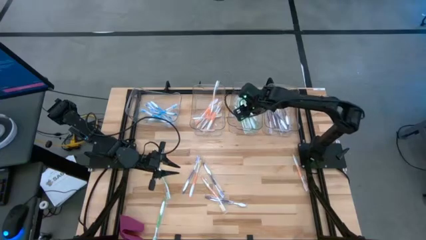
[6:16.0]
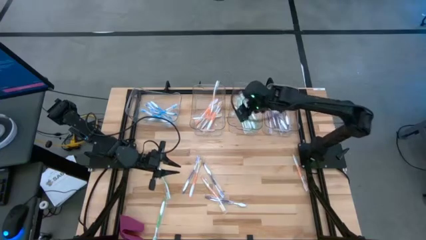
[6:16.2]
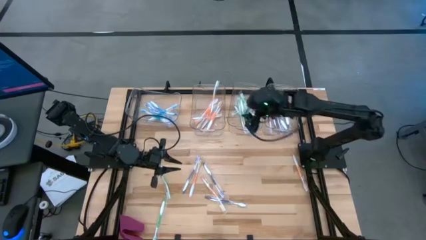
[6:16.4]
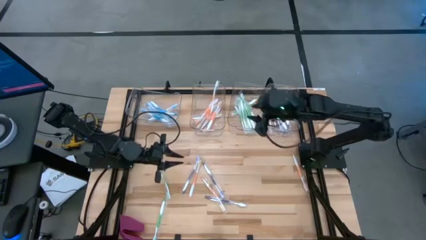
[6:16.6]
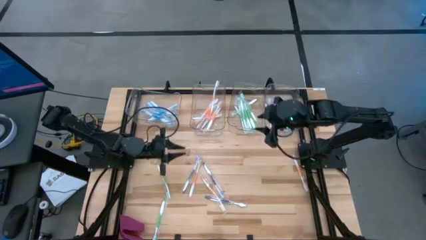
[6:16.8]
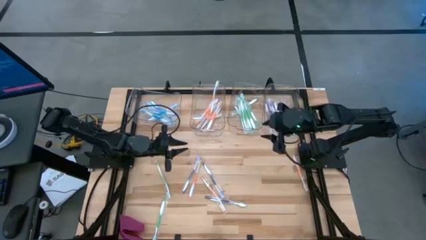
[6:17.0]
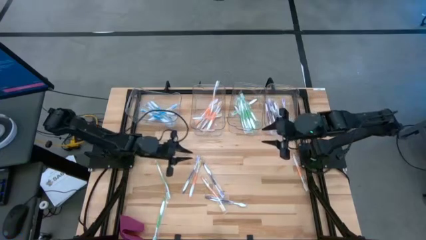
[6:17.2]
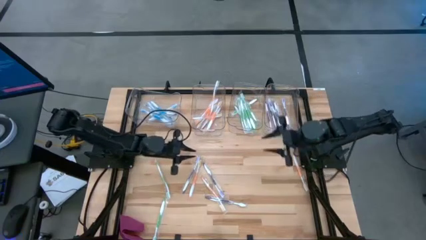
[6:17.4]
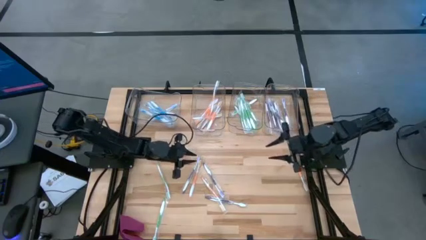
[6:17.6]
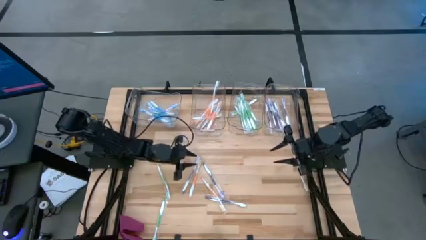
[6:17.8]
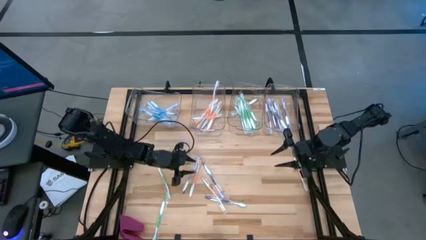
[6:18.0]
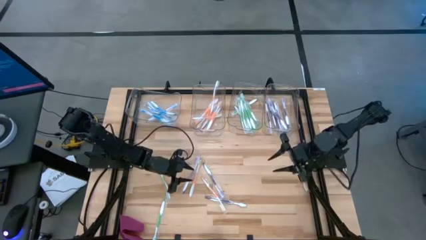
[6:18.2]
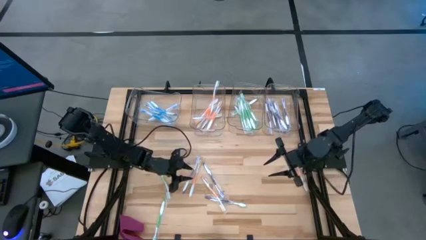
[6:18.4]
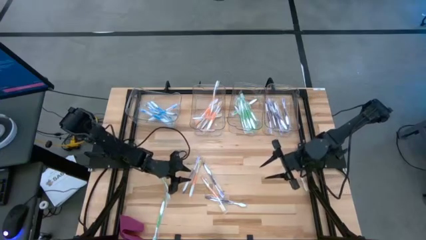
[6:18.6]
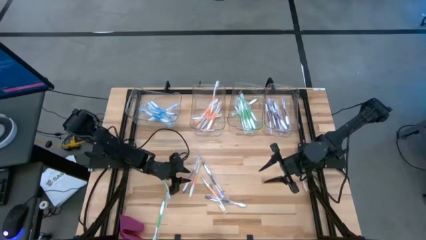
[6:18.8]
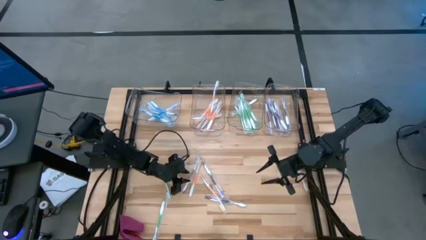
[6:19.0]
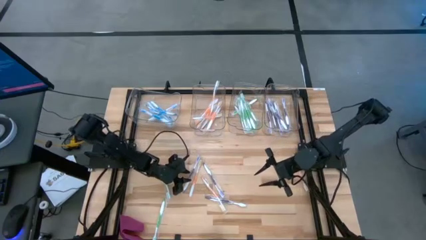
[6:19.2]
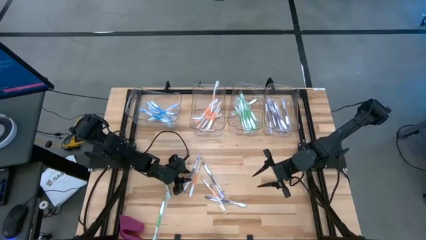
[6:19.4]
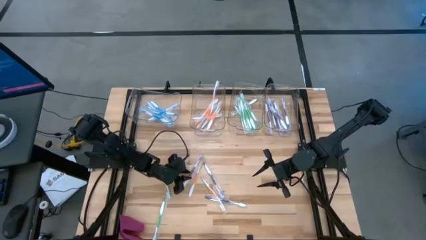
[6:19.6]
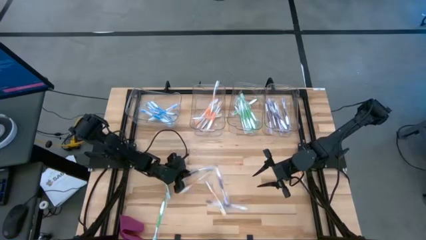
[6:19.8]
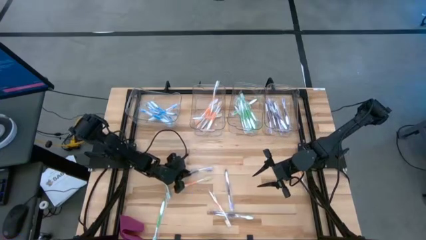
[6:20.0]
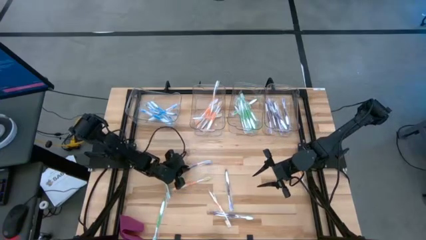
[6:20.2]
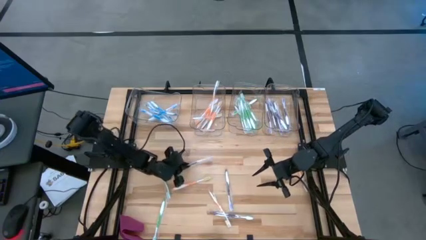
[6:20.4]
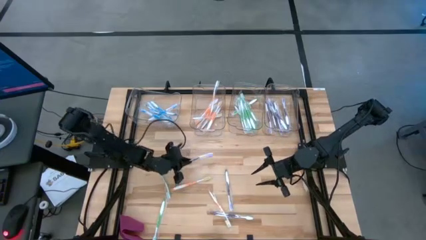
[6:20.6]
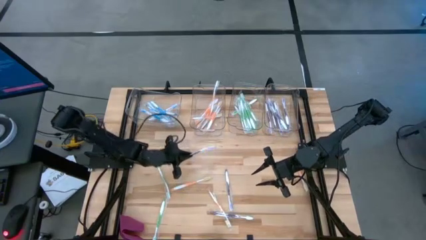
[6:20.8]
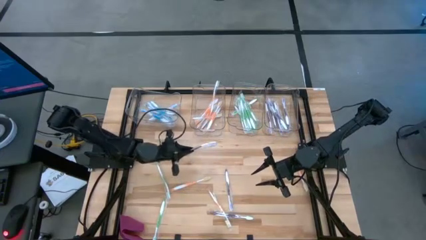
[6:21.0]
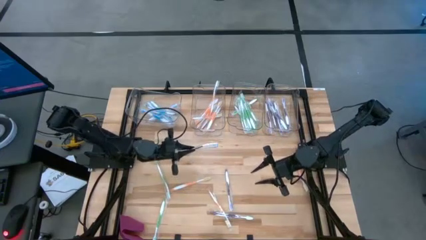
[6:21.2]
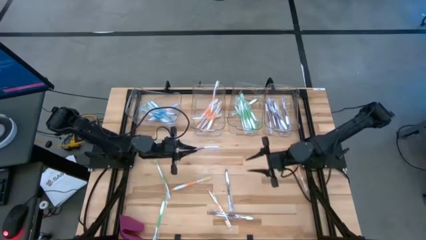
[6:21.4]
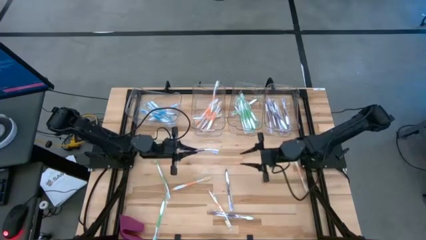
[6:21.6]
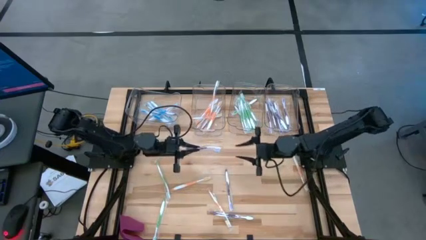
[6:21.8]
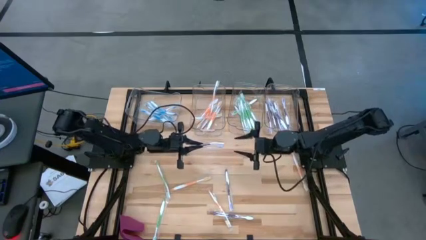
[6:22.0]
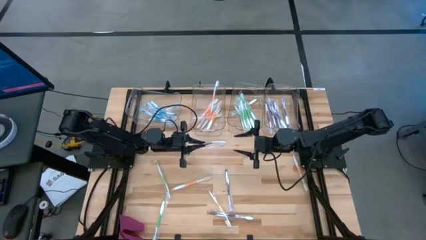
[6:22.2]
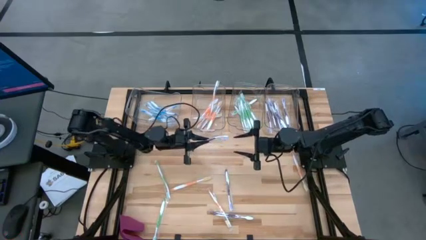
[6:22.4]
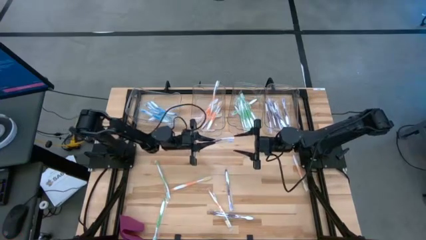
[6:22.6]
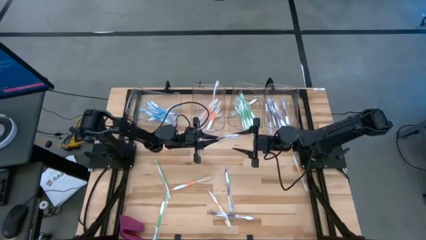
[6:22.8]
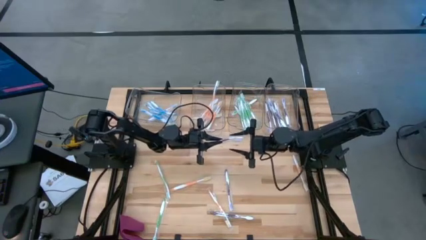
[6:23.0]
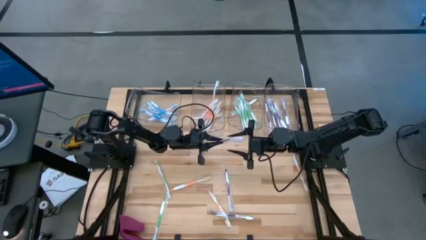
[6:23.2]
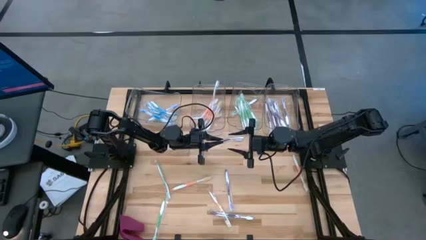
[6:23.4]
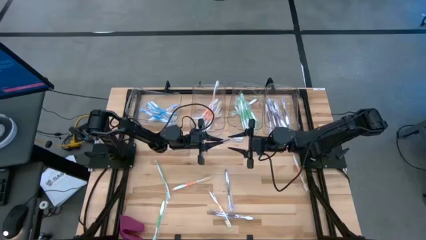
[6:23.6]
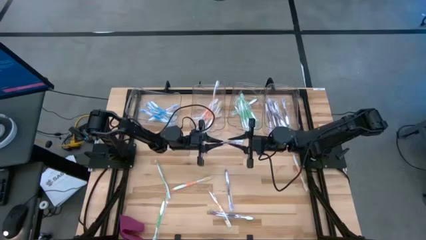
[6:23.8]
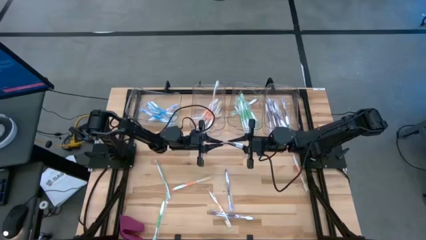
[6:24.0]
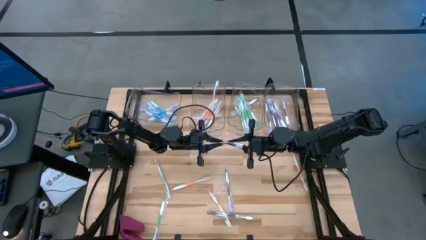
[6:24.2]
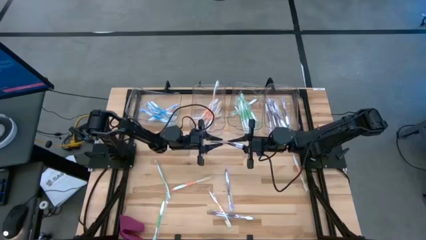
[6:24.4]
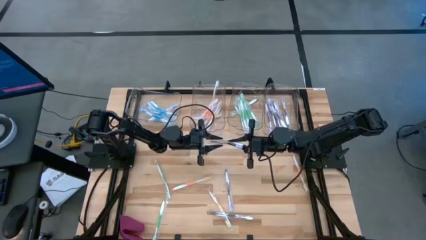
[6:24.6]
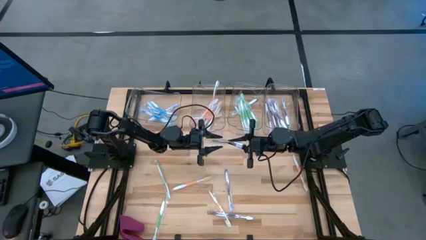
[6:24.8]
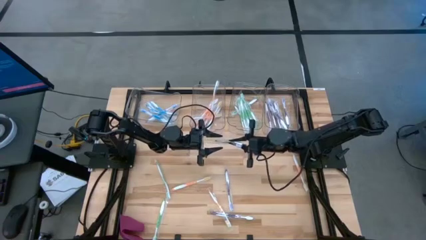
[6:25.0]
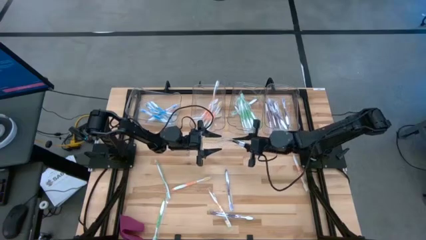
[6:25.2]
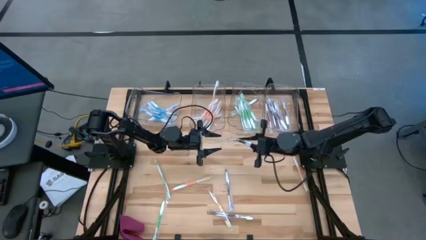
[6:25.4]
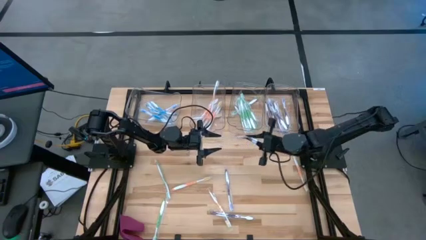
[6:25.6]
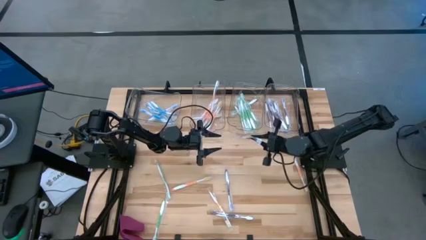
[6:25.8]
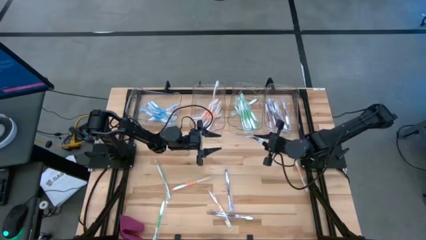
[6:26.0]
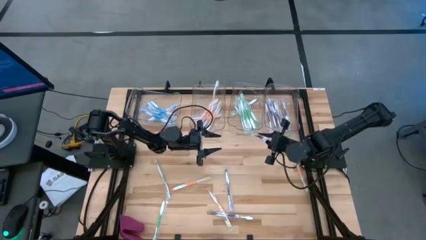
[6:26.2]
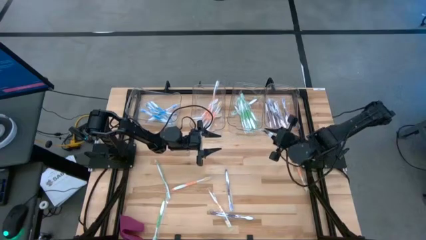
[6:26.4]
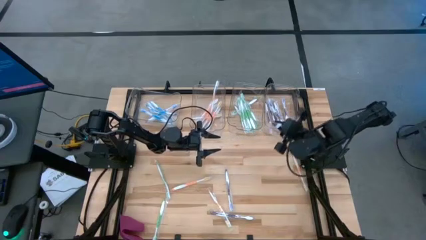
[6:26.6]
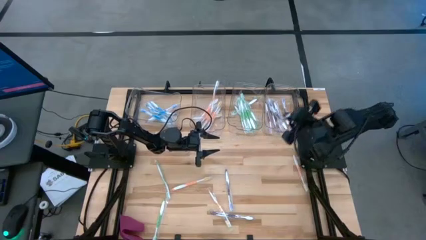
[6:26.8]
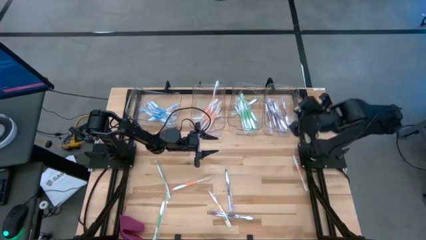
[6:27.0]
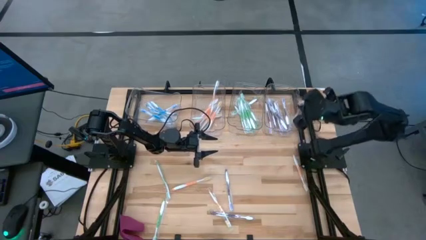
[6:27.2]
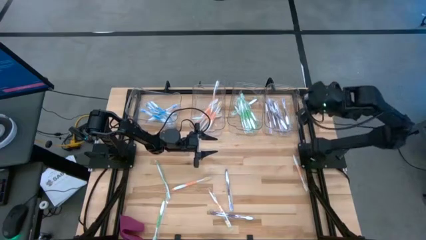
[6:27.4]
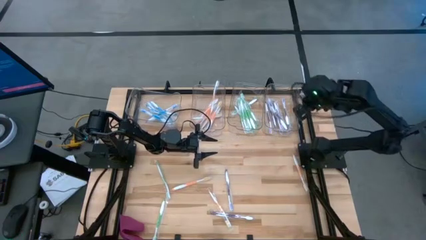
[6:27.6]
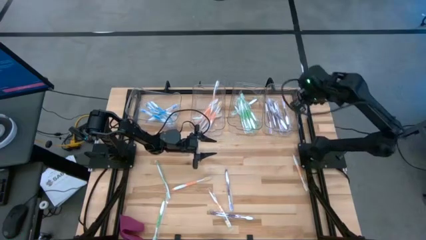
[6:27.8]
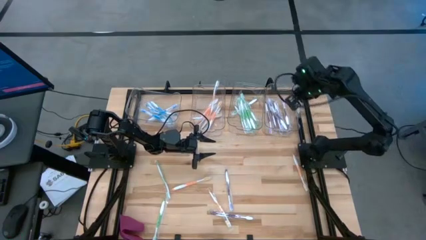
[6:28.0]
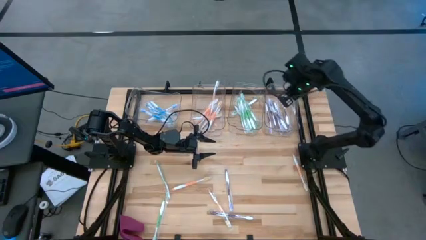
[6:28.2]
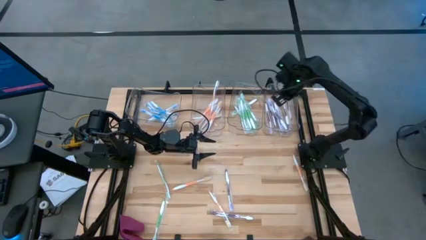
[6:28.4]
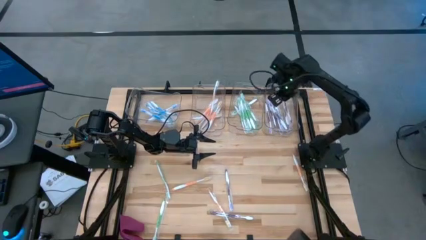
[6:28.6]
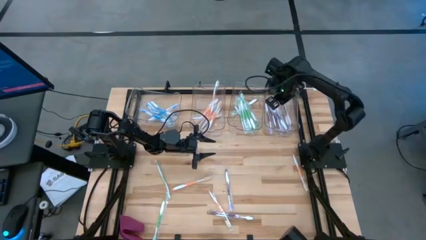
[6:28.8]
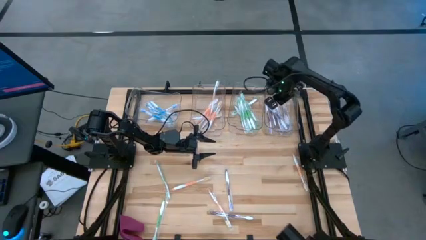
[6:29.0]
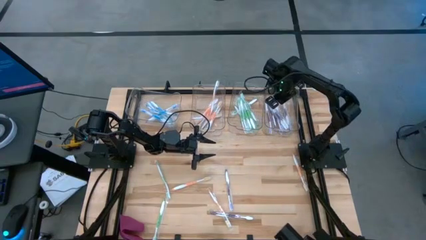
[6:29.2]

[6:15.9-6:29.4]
Task: Pick & Place Toothbrushes
Put the violet toothbrush into the right transparent bin

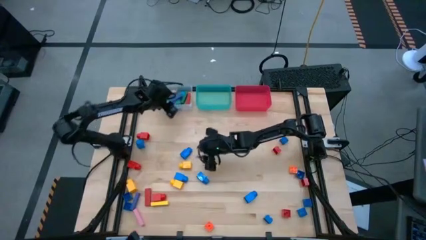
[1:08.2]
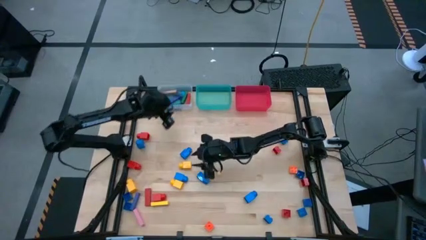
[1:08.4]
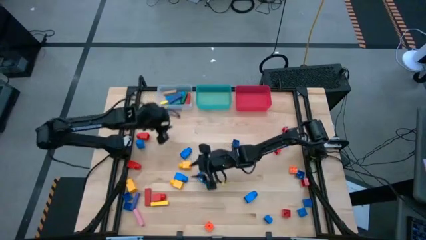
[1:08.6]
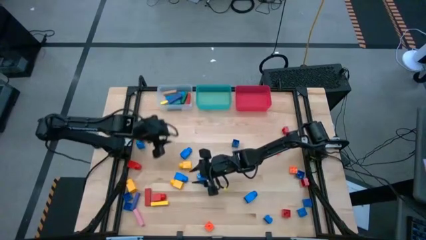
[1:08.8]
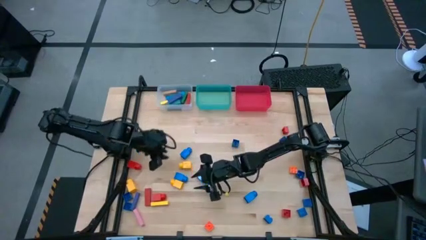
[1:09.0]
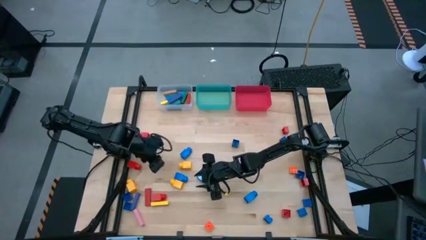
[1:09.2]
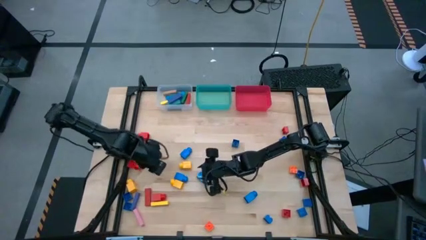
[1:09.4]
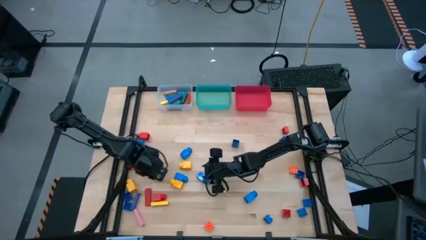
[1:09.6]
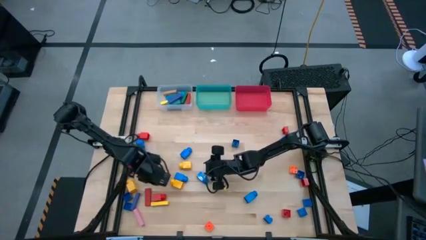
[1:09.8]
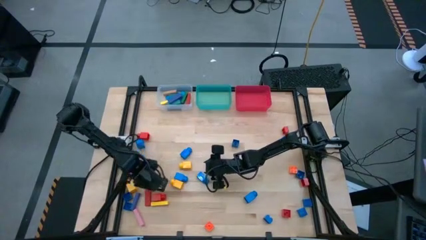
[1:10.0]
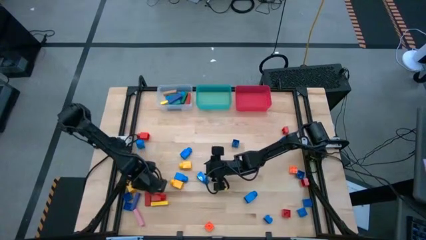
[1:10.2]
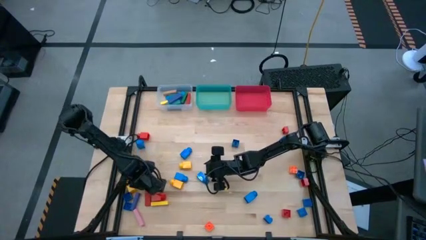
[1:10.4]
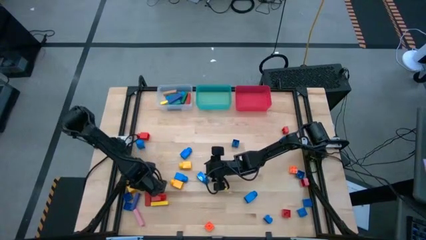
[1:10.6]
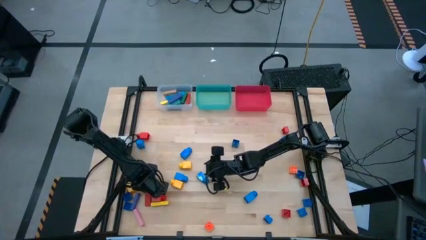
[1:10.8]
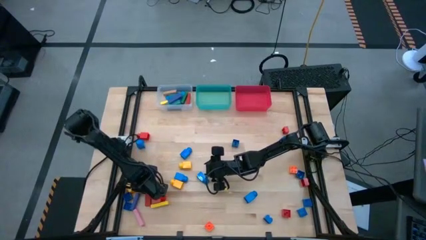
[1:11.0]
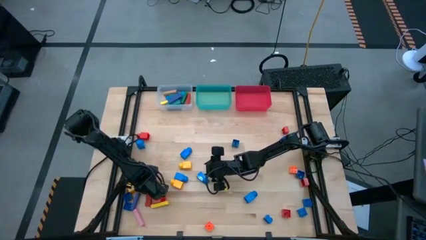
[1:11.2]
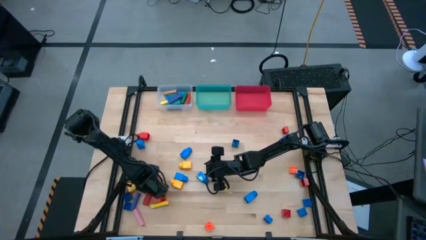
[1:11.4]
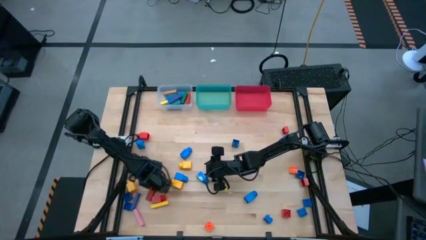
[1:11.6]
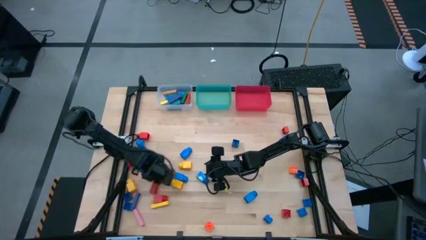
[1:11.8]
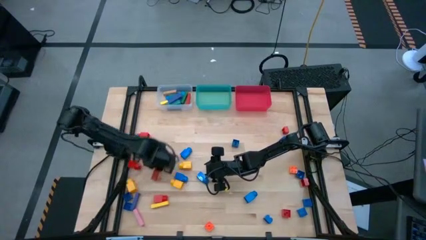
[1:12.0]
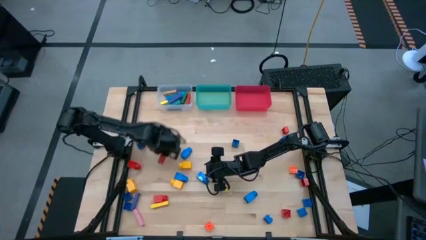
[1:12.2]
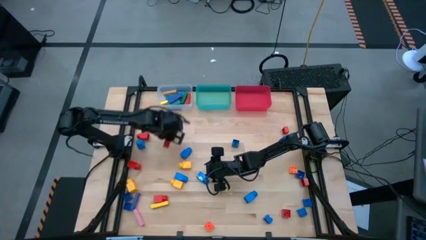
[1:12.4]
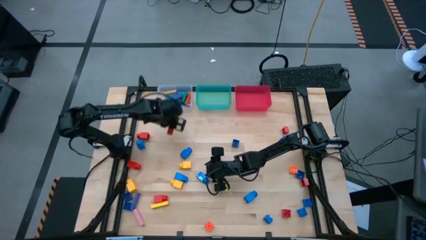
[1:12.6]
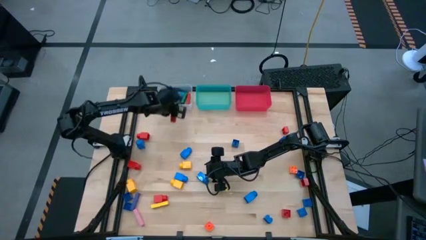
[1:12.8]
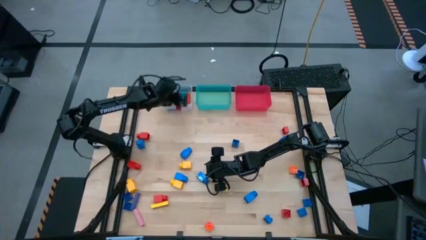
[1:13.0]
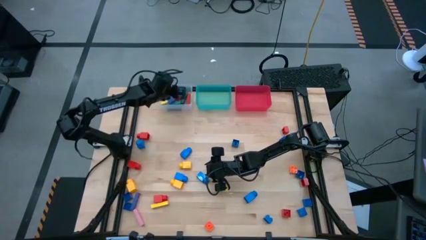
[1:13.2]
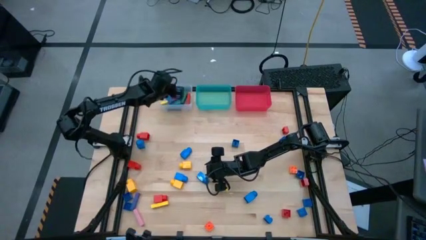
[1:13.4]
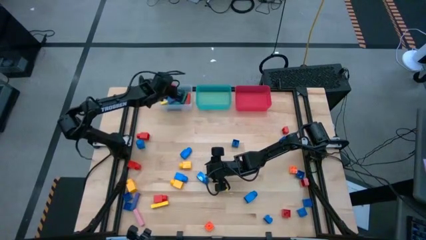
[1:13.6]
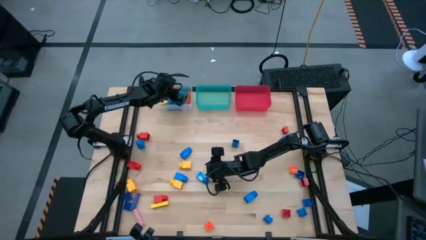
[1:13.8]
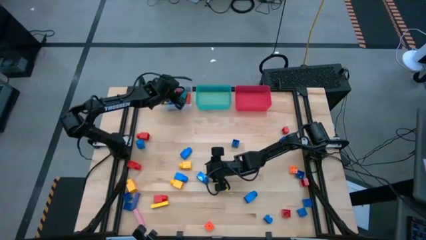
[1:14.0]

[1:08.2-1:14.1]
Task: Sort blocks by size
Put the red block into the transparent bin
